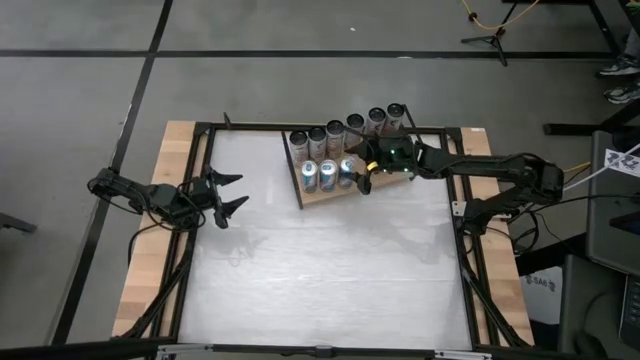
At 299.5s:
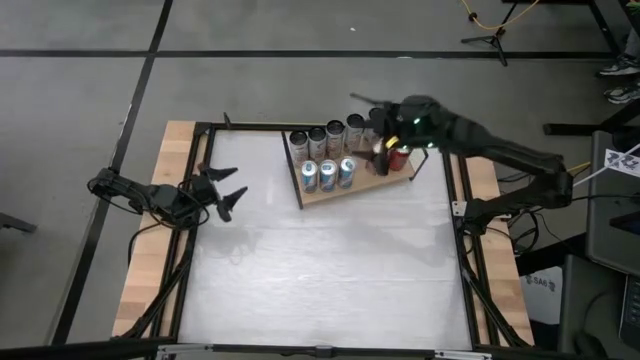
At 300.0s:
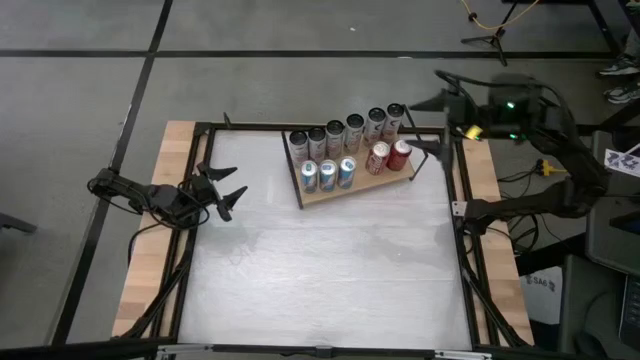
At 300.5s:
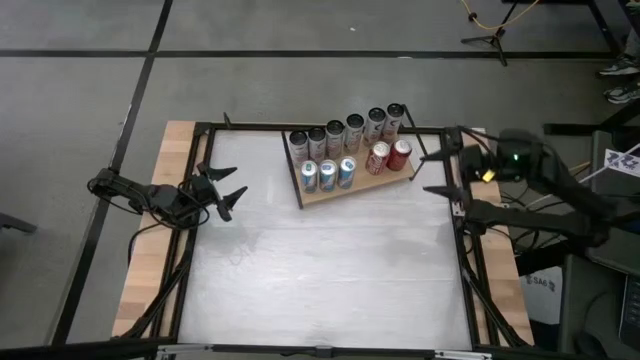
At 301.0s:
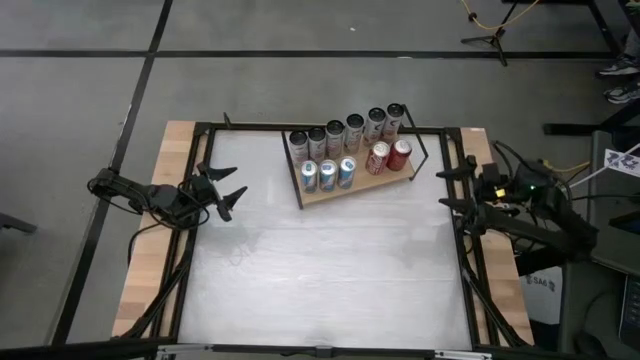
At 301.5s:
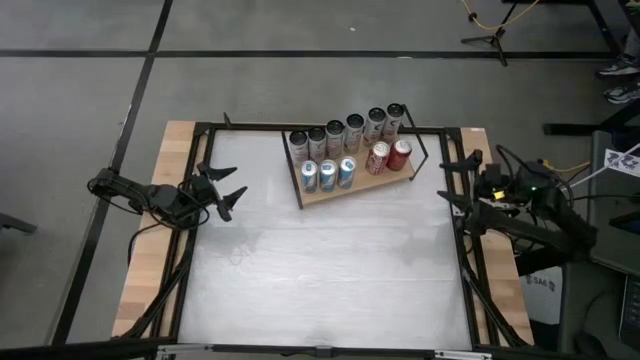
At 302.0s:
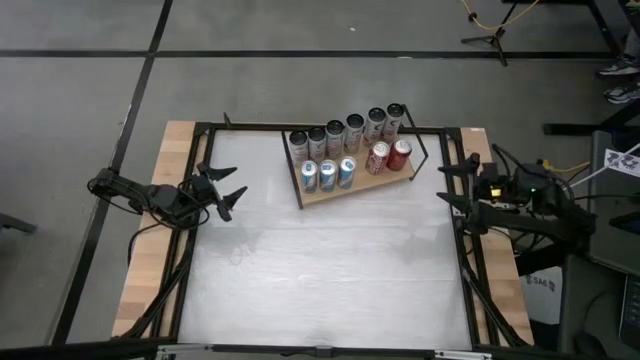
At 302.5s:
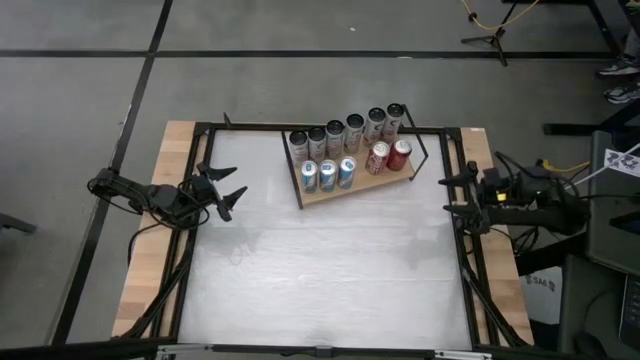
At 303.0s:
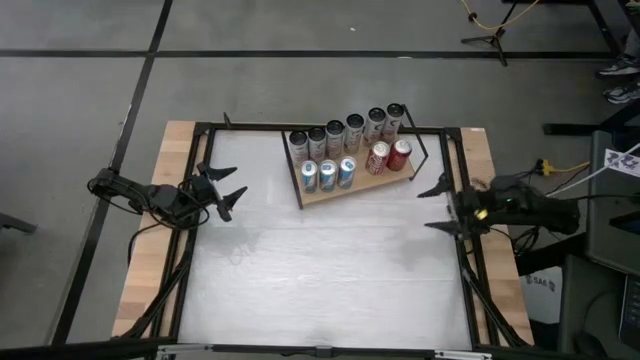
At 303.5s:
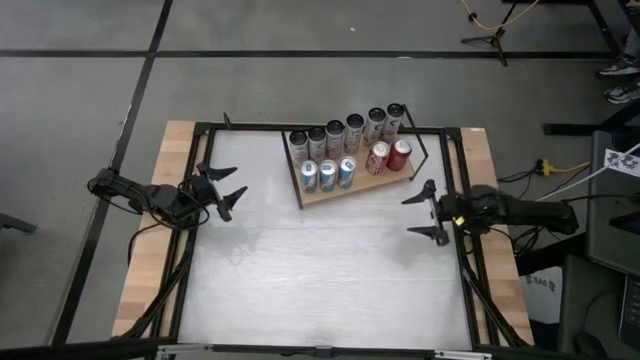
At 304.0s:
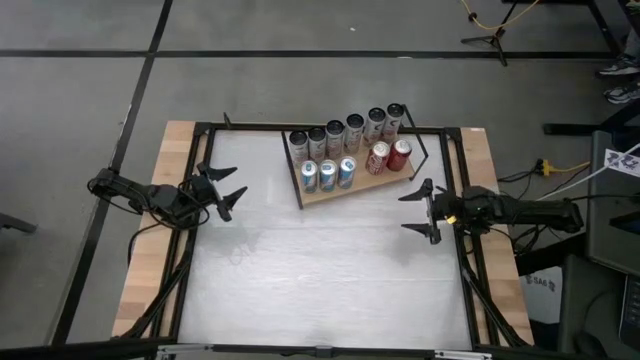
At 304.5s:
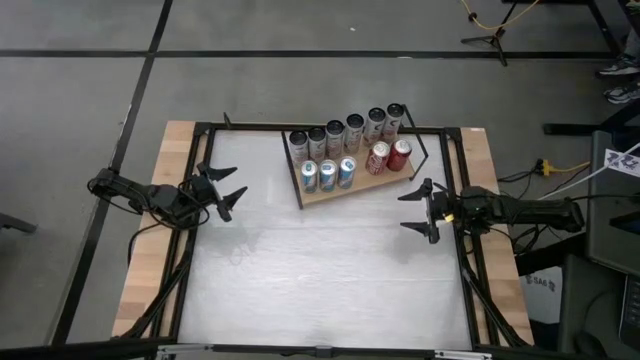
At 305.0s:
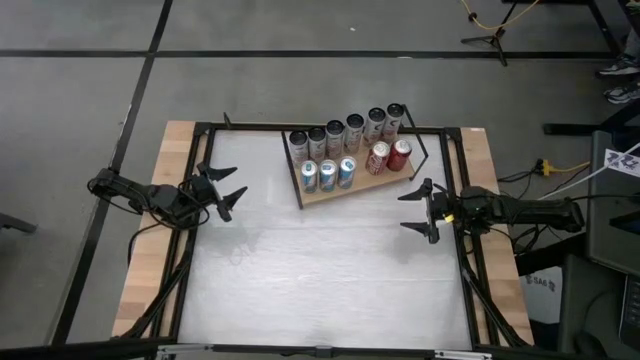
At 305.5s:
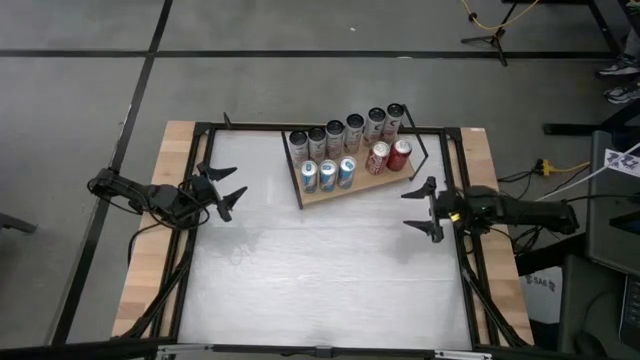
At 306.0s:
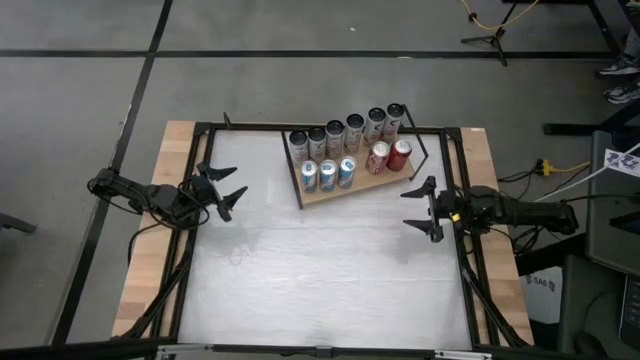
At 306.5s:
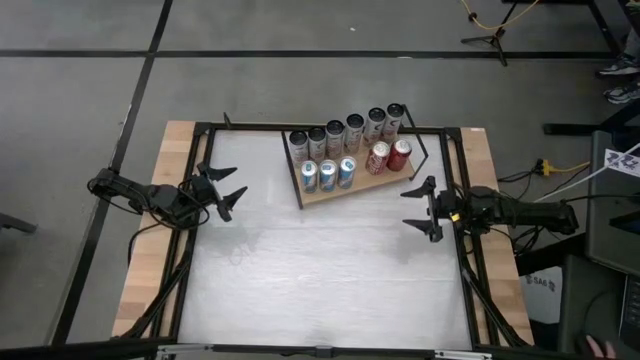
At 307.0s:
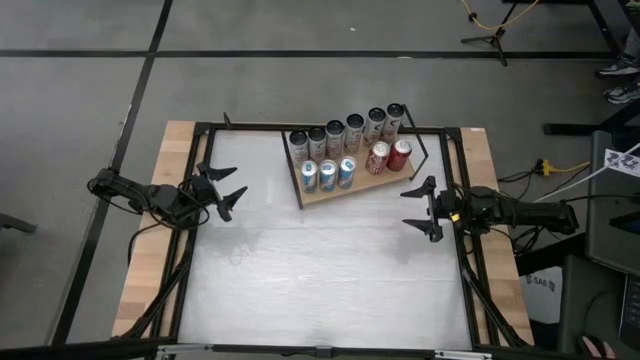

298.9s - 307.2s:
Task: Place canned beverage on shelf
Return to Home Position

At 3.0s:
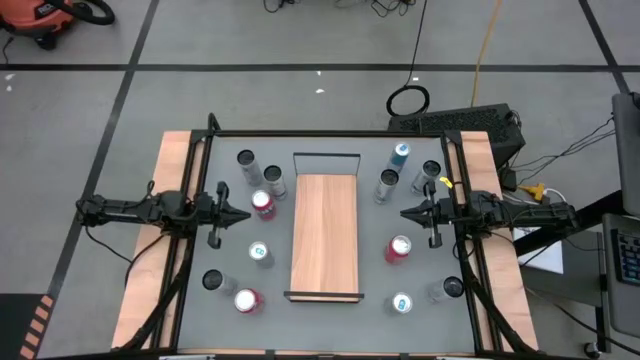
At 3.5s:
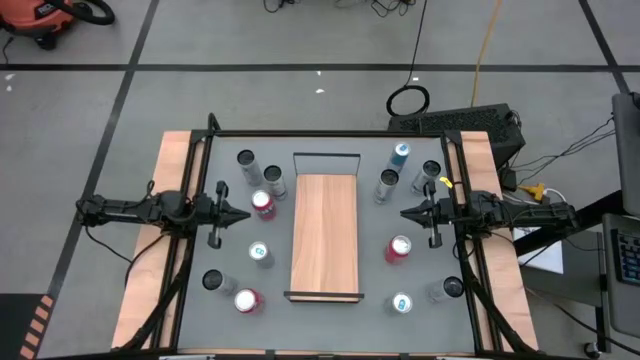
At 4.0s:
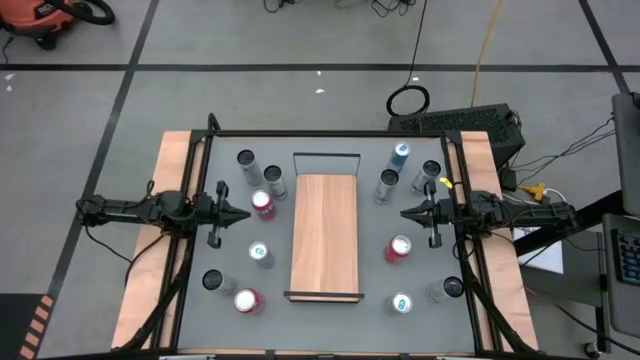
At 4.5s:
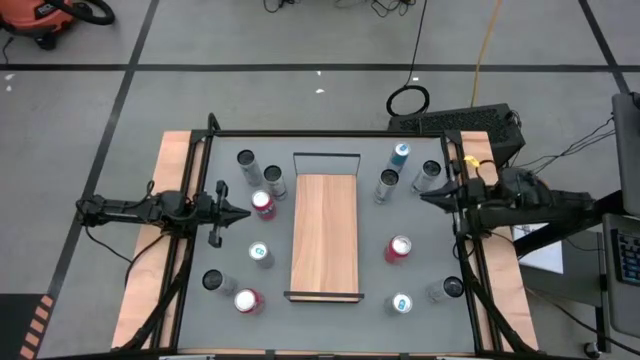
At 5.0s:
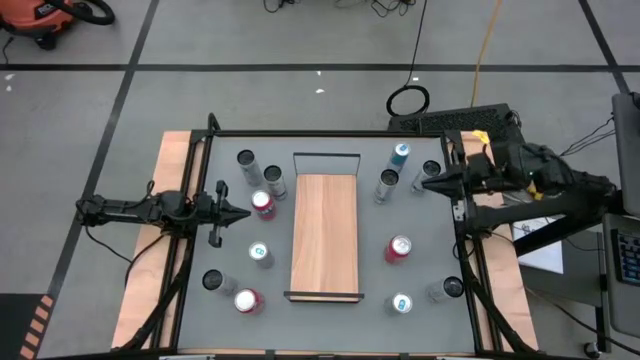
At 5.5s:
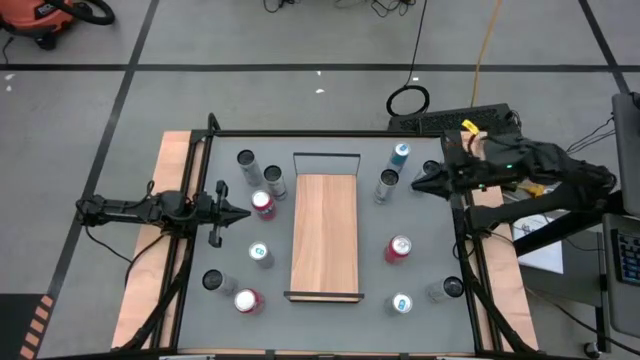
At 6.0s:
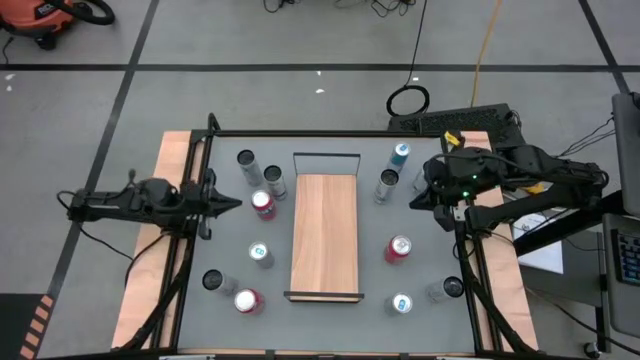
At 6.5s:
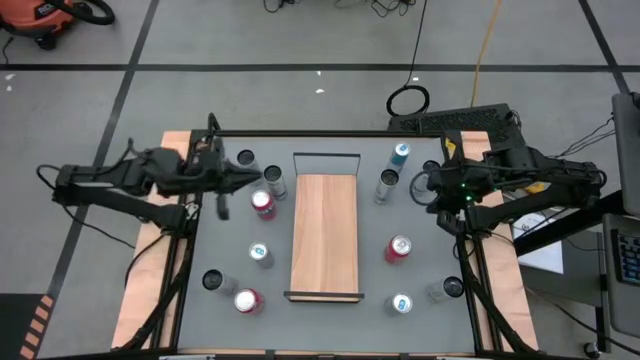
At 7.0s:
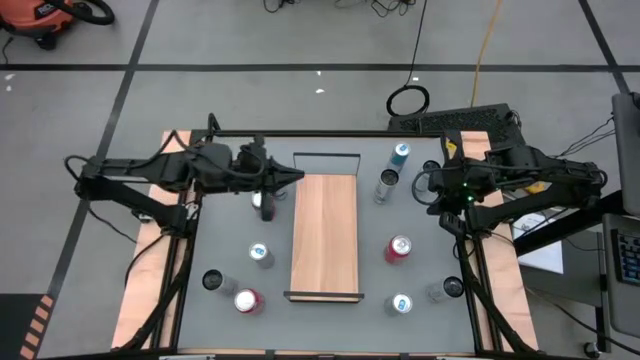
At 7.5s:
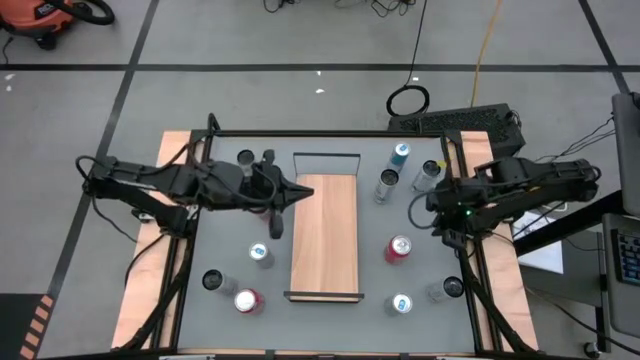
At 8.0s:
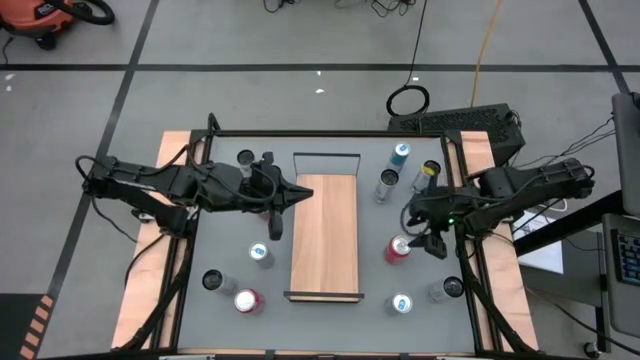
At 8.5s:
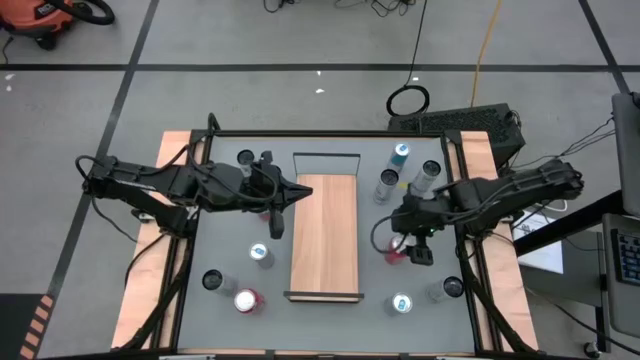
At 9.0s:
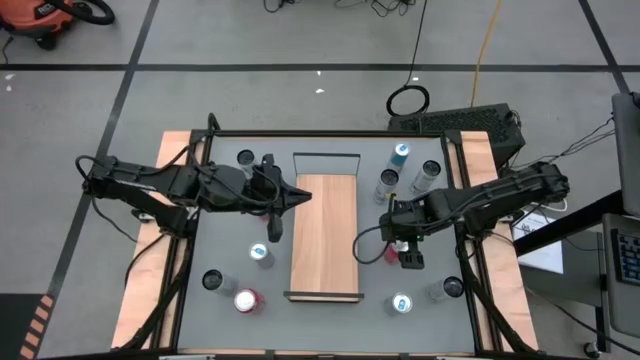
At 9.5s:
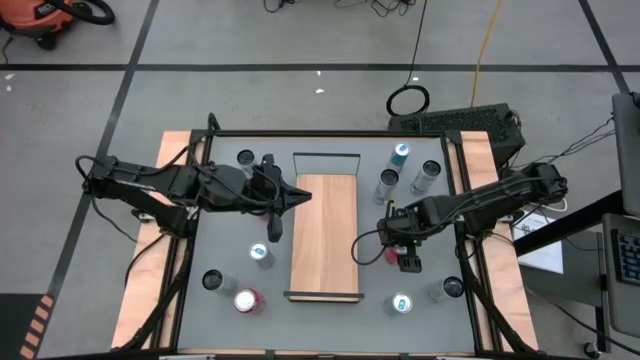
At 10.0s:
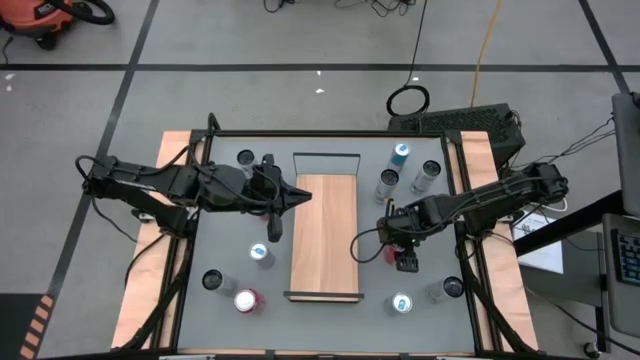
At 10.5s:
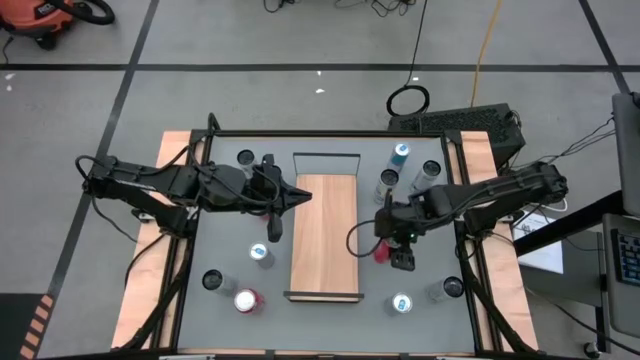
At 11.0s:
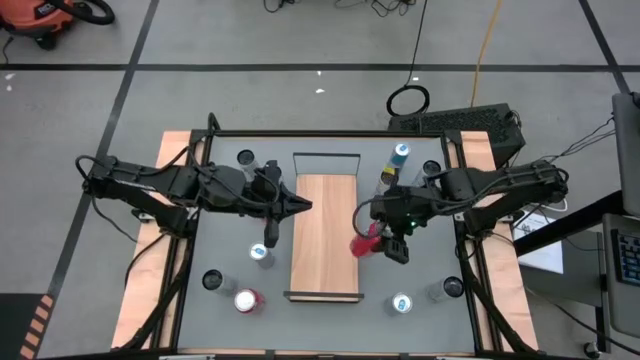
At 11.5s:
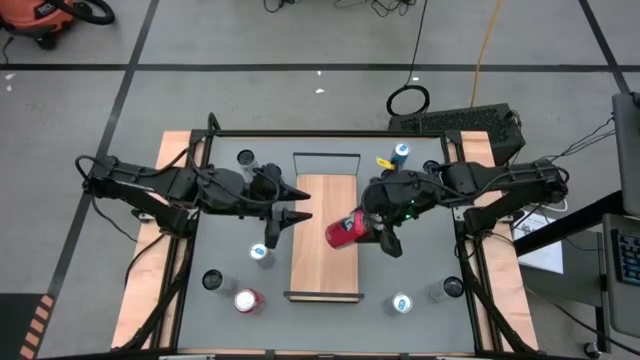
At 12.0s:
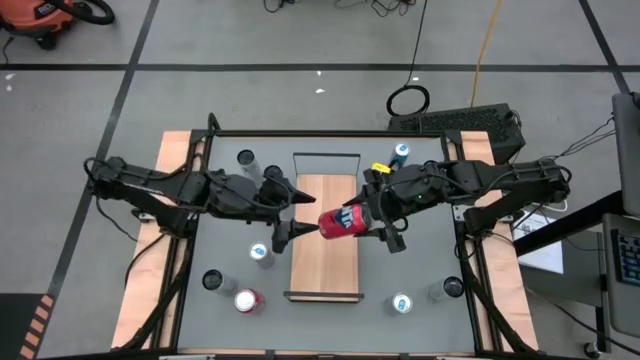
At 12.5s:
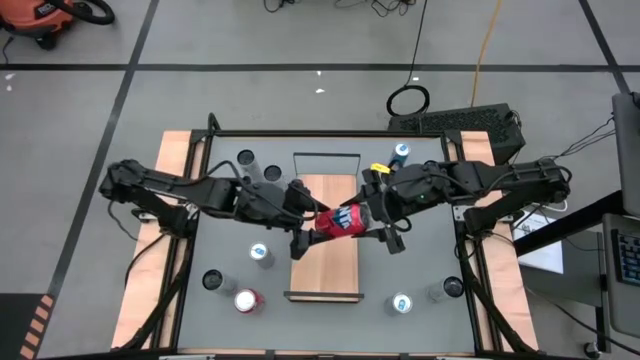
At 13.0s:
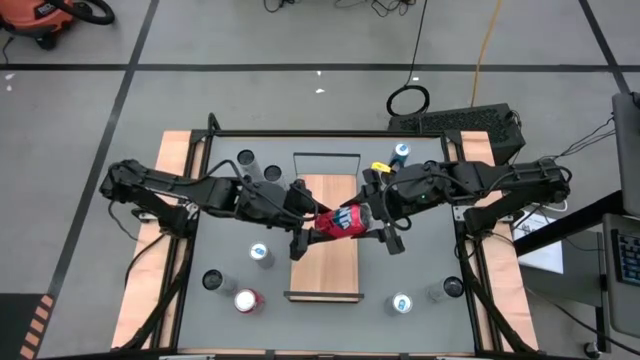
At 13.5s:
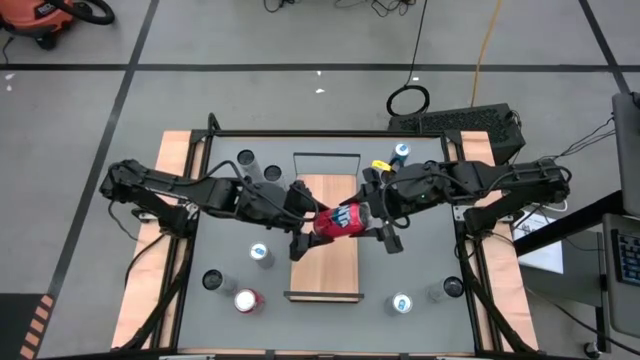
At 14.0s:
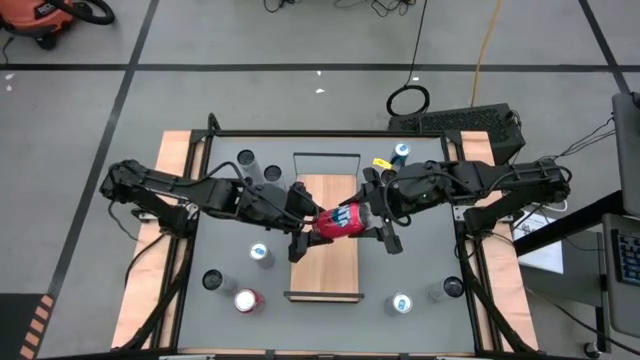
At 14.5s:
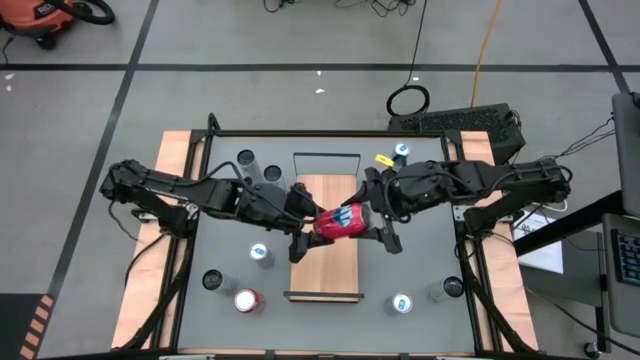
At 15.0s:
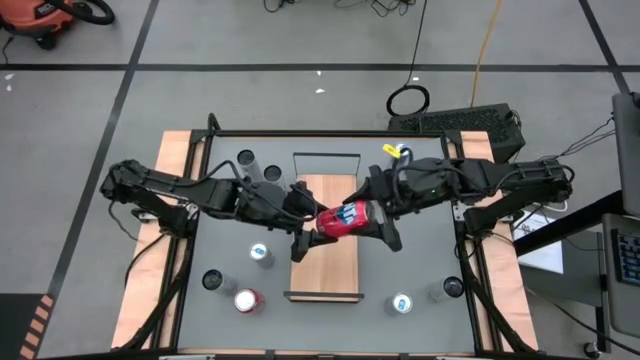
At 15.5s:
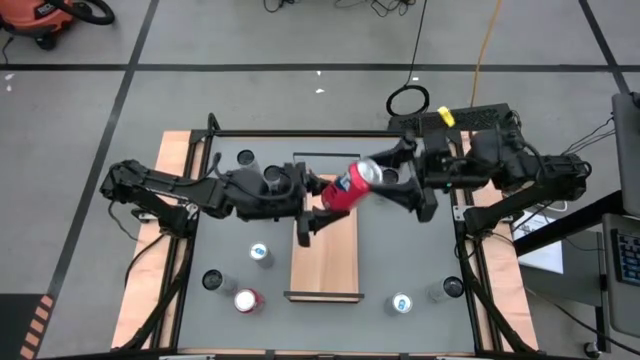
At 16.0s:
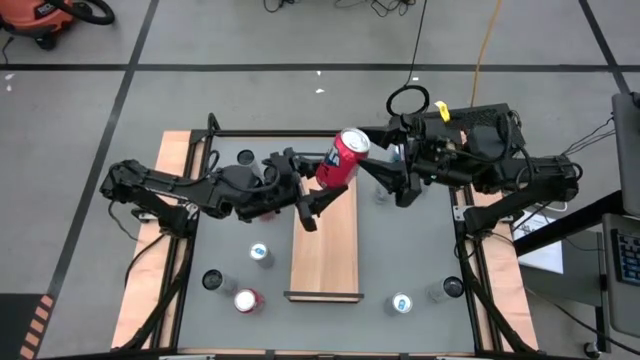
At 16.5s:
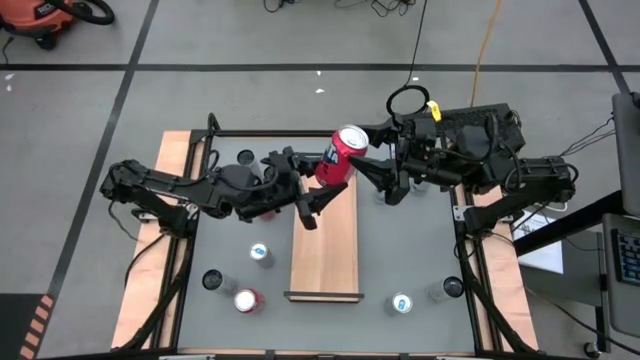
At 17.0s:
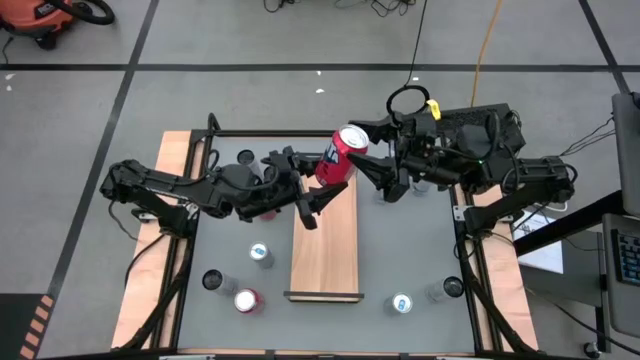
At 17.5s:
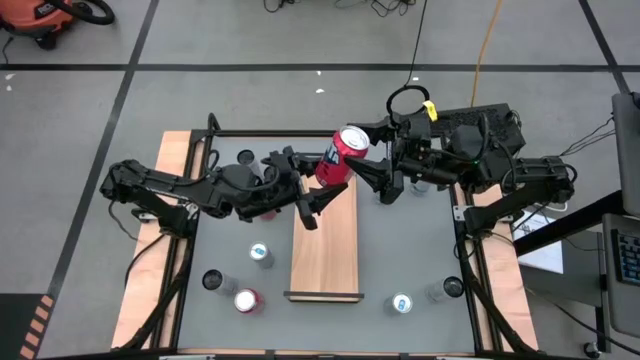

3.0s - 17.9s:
Task: Sort soda cans
Put the right red soda can on the shelf
